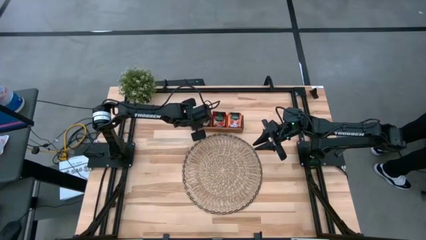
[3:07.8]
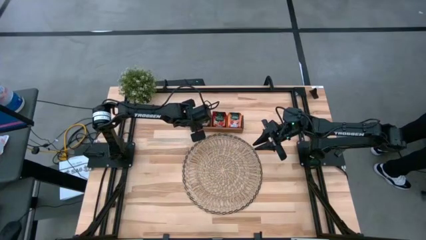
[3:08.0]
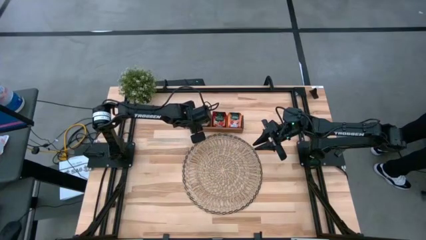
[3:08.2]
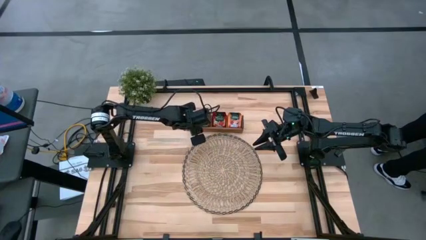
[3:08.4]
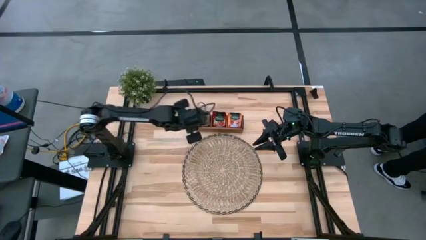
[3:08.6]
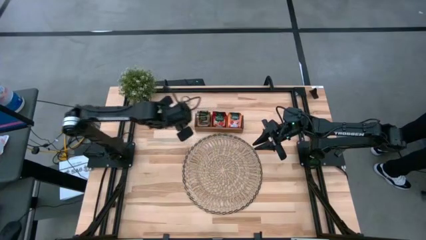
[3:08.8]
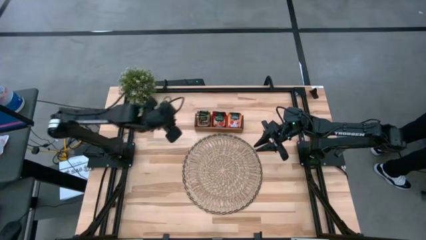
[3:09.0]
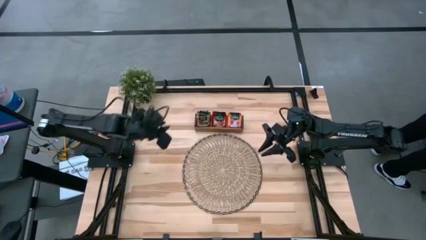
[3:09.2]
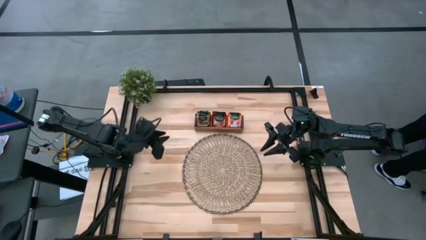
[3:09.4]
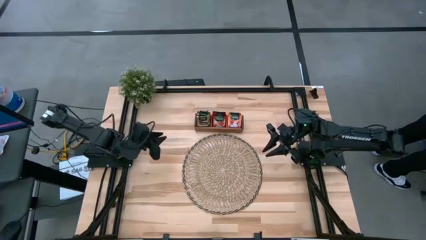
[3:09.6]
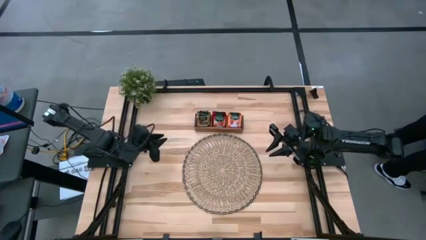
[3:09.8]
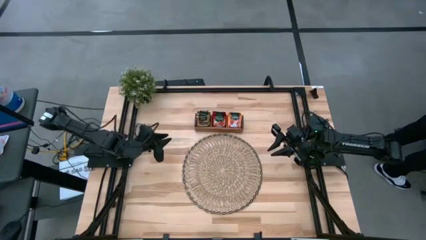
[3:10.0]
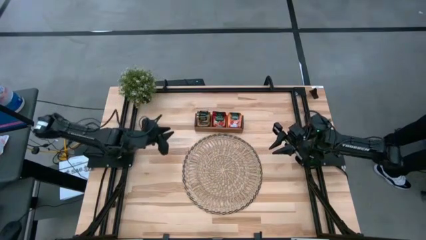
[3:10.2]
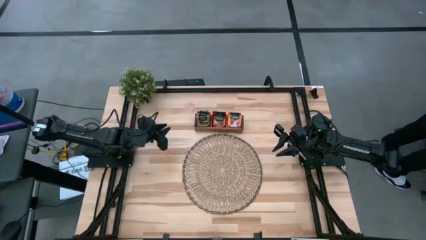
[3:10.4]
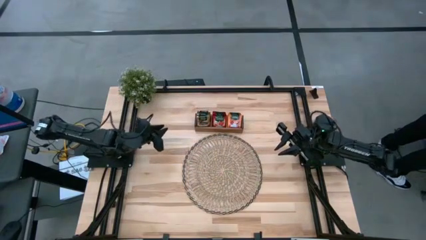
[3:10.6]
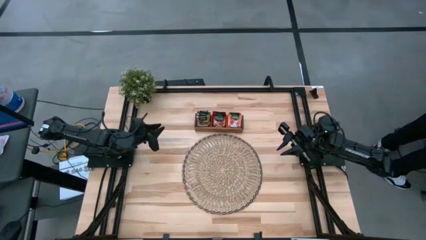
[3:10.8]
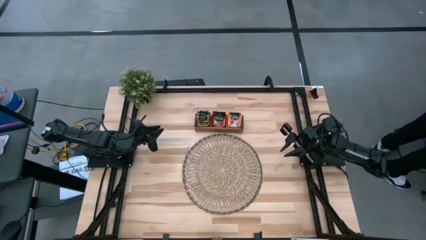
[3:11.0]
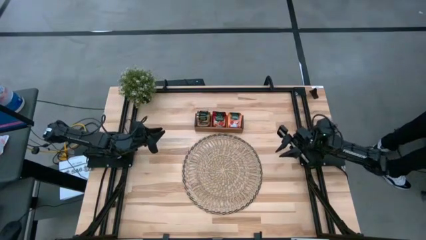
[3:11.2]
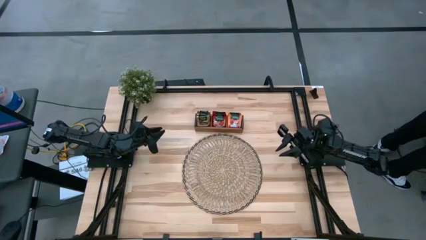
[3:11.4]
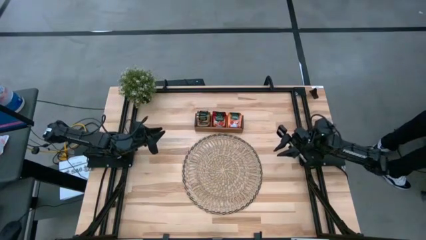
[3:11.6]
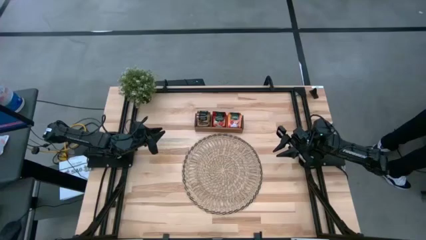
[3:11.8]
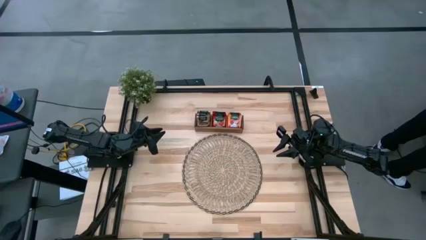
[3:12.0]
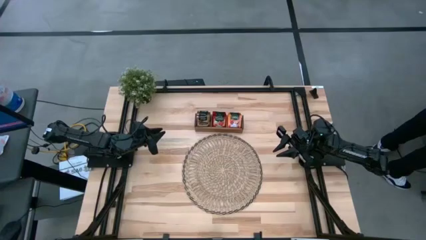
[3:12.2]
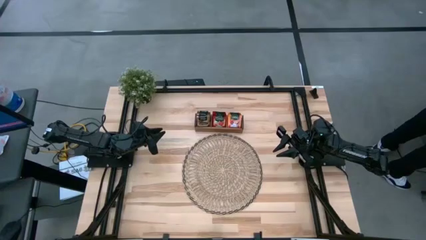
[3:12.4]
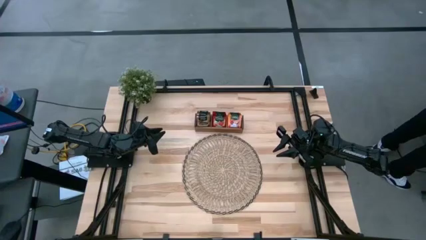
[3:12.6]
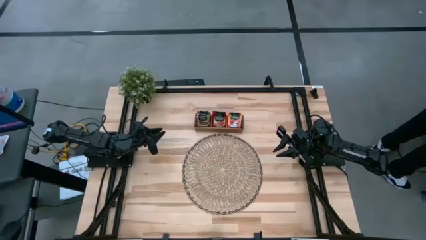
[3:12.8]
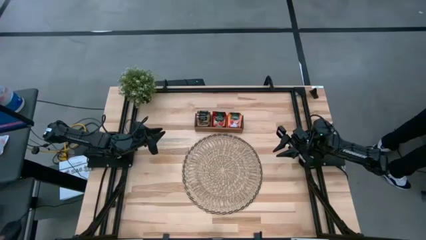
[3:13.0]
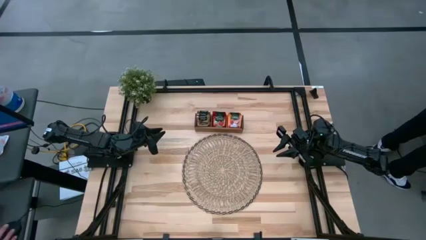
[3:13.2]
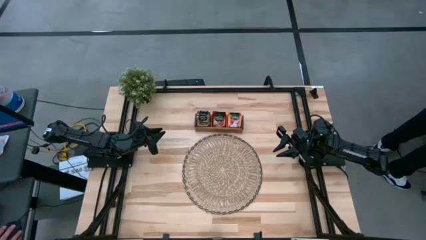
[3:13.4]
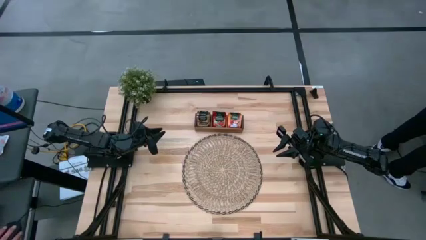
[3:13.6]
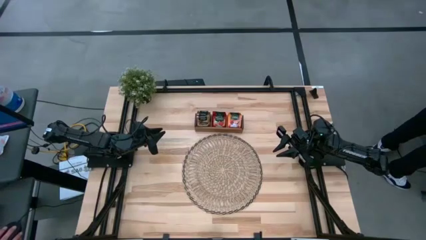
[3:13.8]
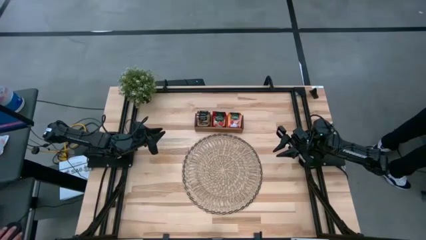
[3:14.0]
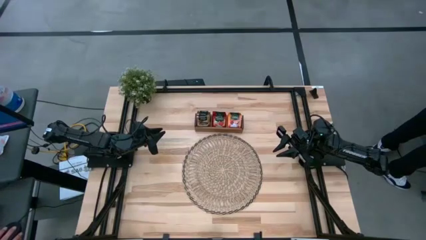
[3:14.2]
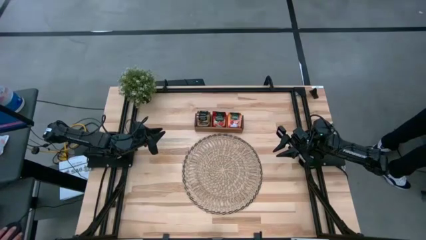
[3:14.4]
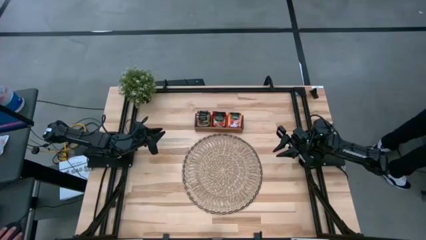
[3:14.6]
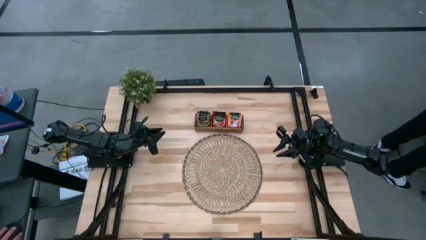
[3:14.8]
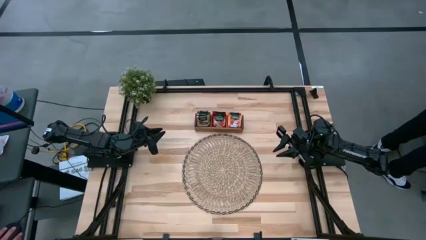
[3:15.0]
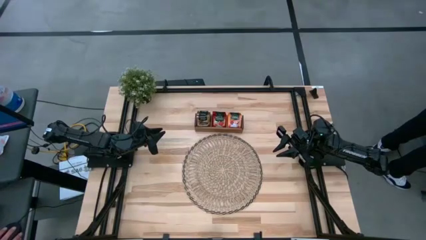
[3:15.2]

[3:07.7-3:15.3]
Task: Pick & Place Tea
Return to Home Position

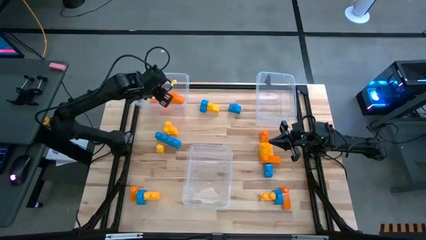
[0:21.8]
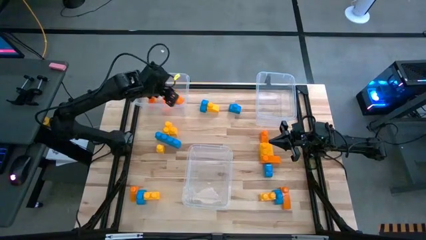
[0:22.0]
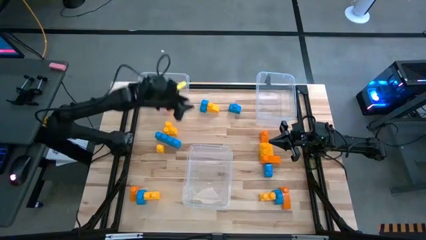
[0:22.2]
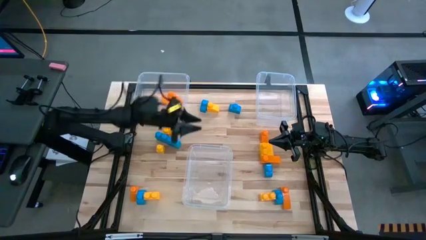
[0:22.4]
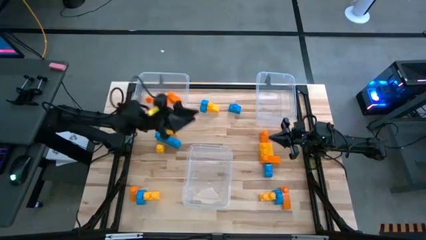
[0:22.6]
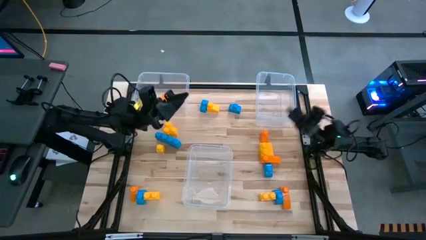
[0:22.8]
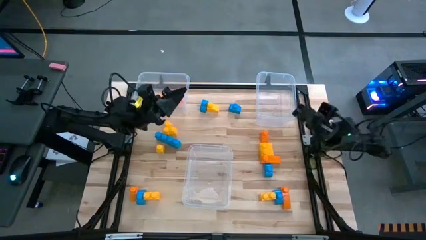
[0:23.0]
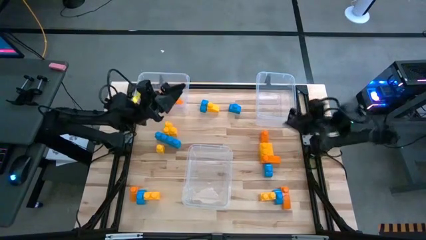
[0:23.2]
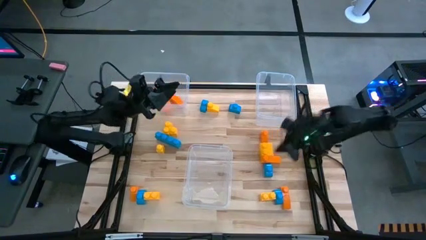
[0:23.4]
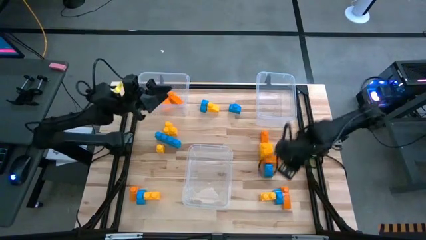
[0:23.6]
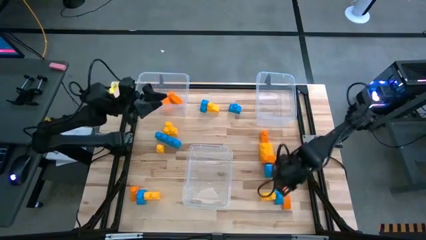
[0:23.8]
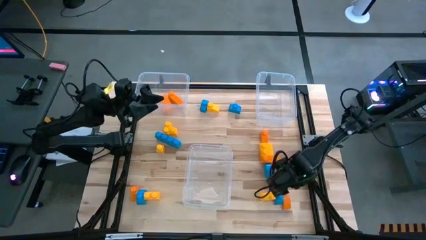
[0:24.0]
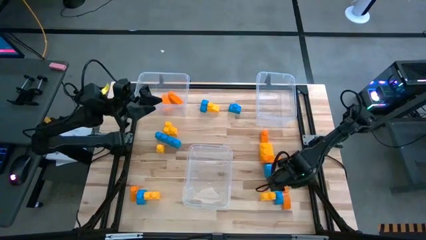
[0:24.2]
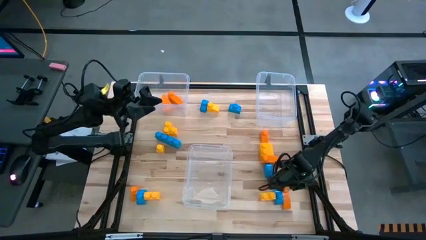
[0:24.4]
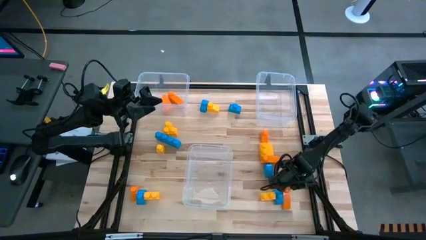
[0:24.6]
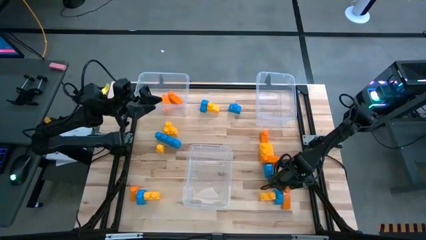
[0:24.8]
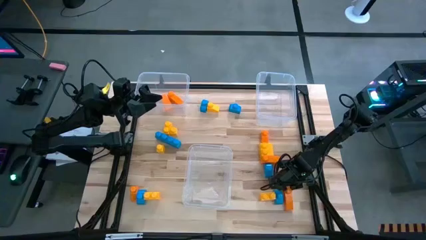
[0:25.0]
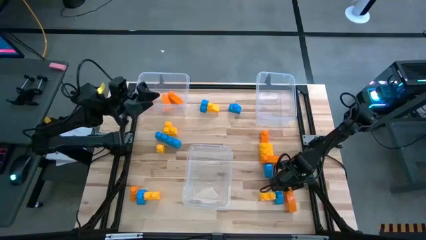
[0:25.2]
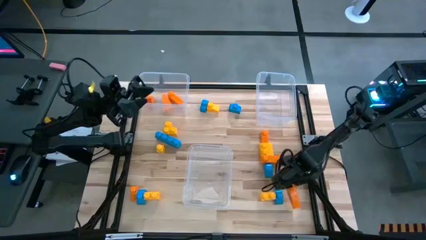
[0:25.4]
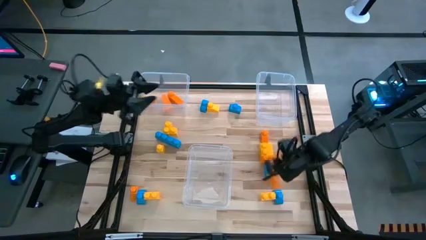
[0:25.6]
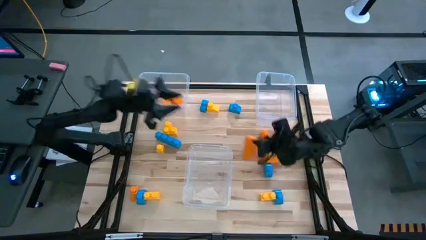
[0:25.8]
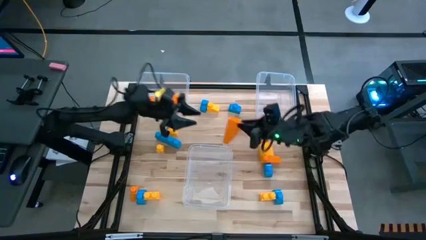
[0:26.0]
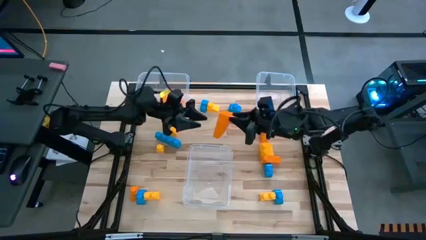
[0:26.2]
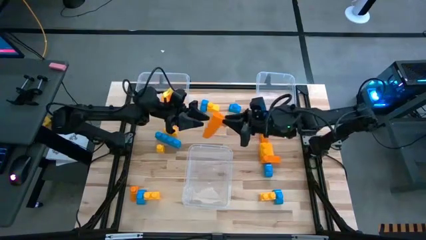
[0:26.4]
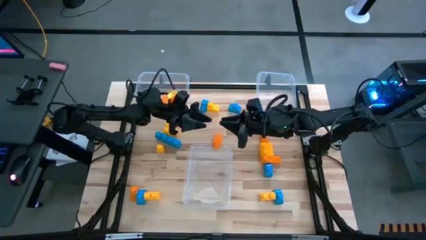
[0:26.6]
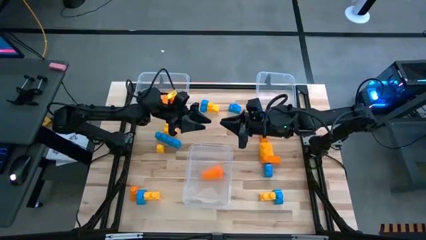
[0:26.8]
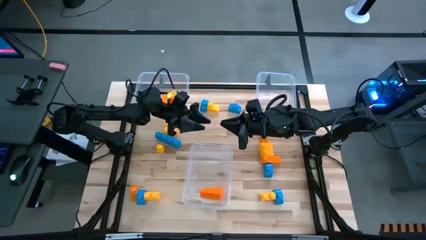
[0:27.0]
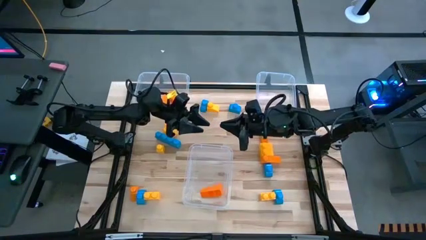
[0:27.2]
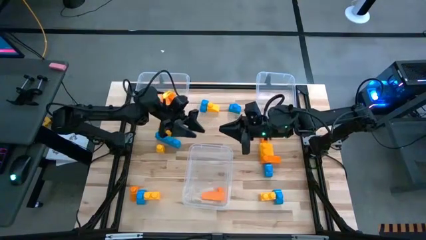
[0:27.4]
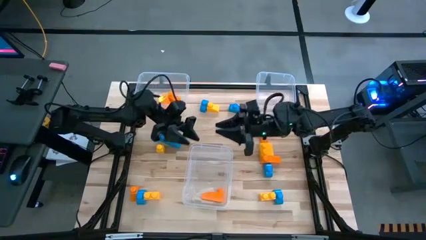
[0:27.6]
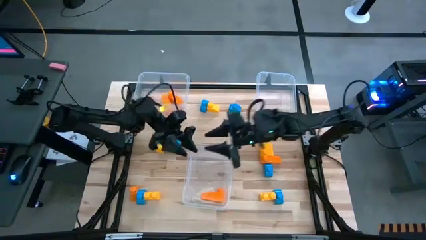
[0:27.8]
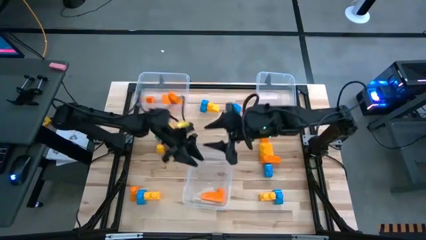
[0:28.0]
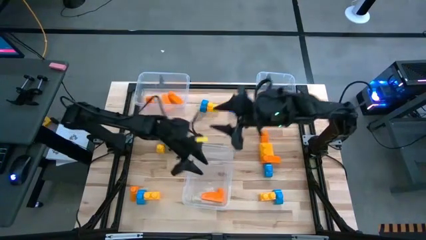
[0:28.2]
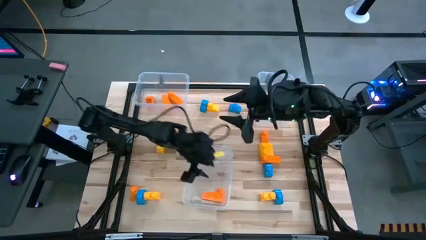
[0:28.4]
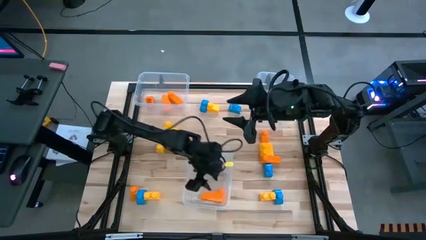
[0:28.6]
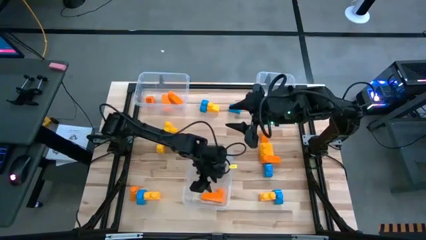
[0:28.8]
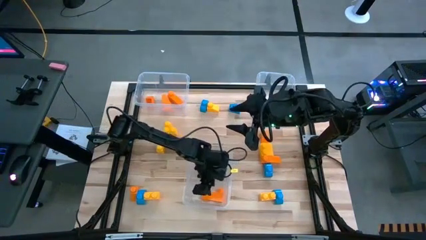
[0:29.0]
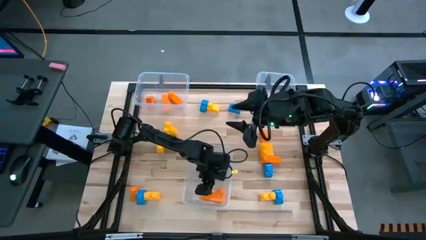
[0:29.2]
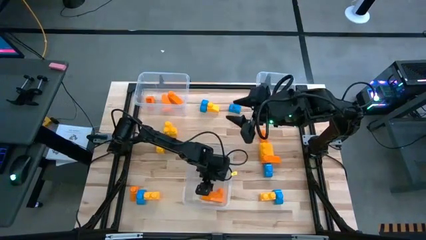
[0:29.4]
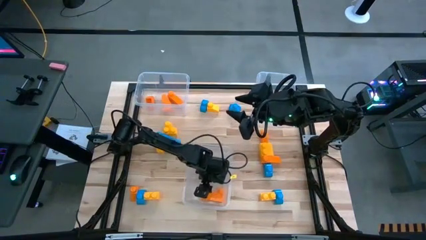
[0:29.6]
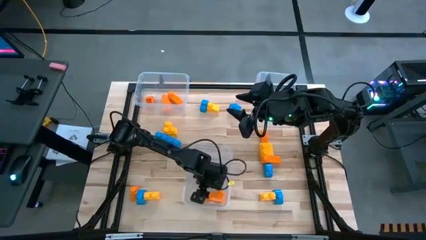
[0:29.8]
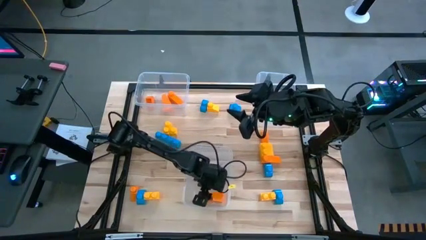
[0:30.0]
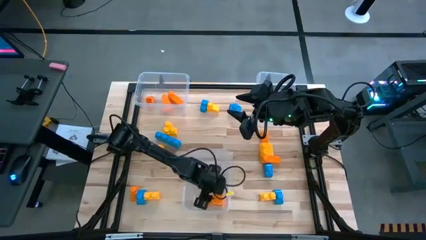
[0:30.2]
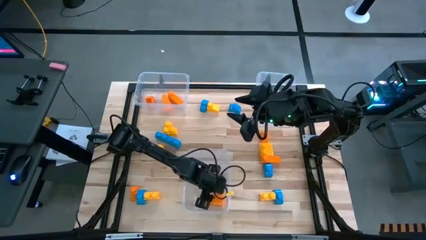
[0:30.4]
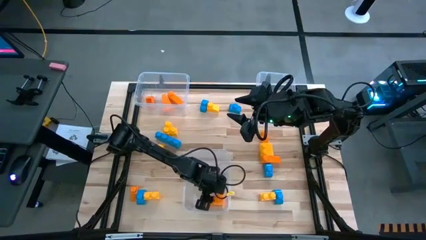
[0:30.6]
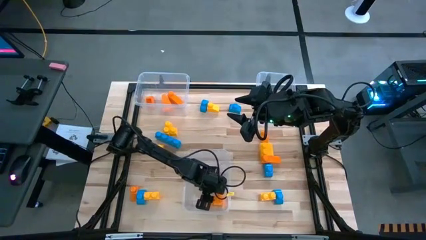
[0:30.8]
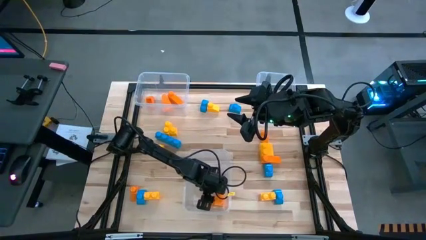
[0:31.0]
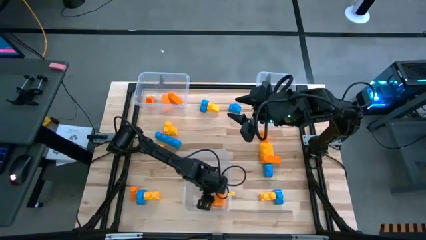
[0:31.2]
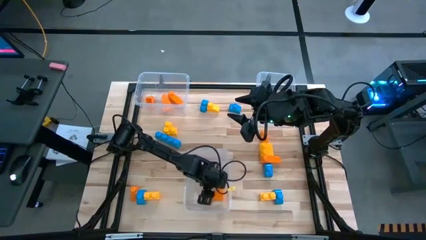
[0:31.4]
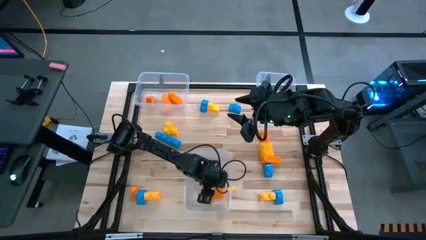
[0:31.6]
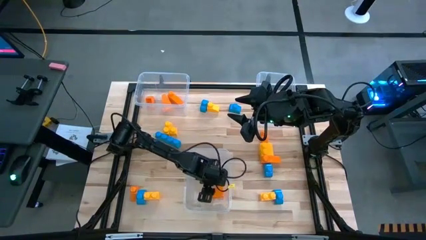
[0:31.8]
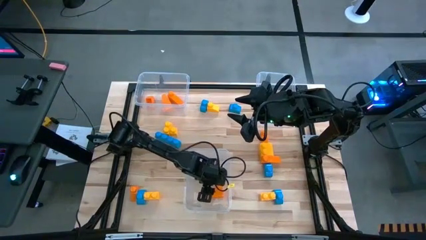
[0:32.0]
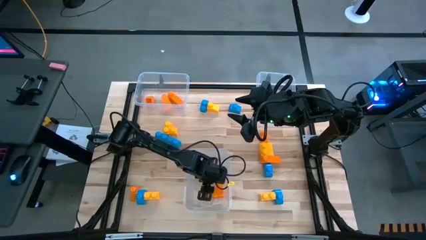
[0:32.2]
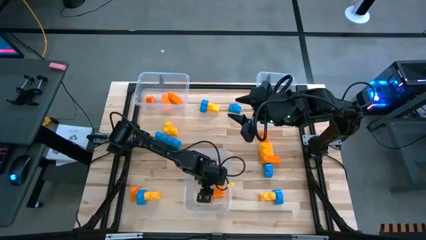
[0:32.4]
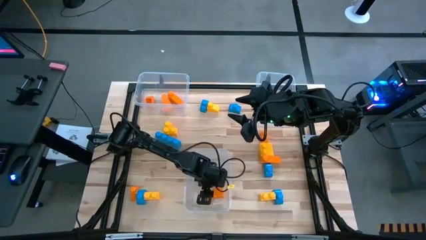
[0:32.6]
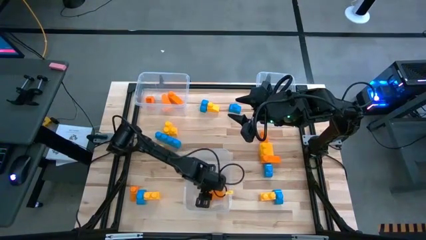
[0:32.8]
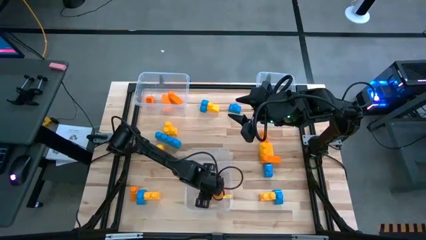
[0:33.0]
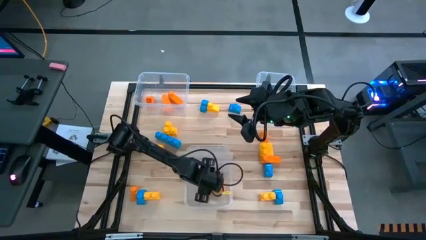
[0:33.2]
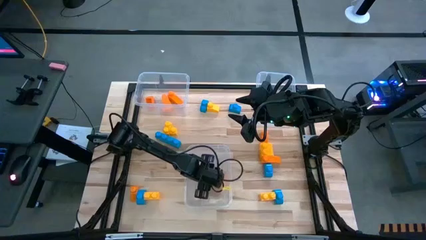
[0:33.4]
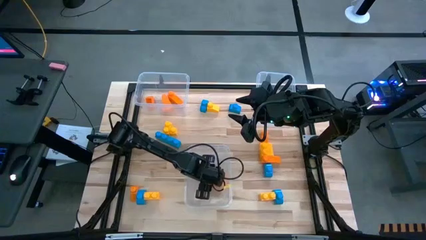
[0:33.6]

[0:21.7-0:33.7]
Task: Sort blocks
Put the orange game piece into the top left transparent bin
